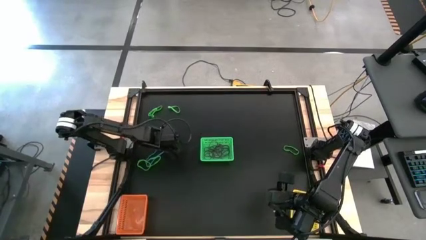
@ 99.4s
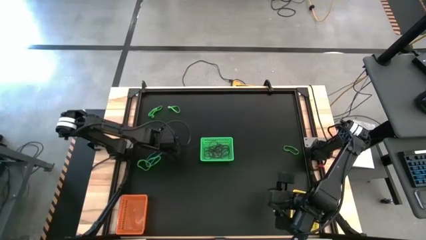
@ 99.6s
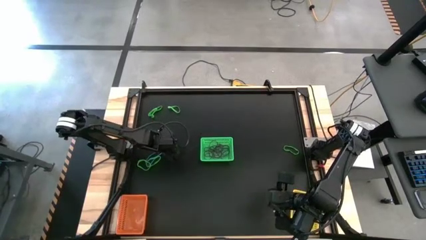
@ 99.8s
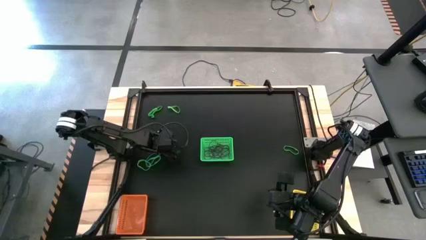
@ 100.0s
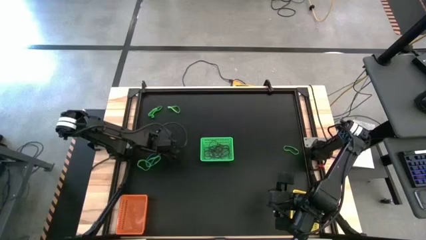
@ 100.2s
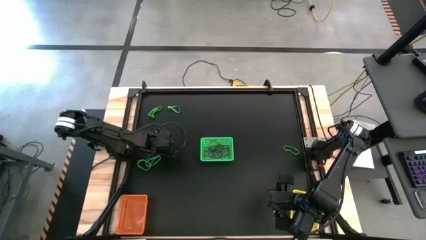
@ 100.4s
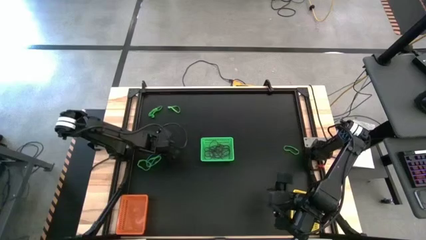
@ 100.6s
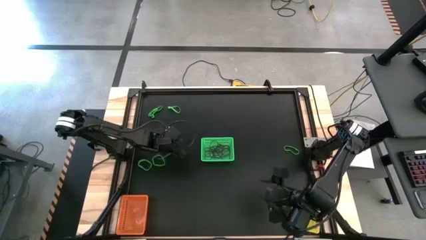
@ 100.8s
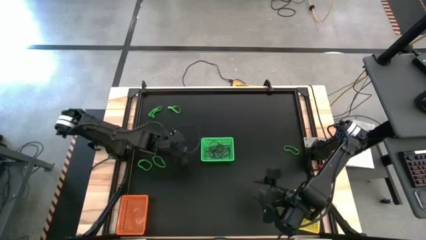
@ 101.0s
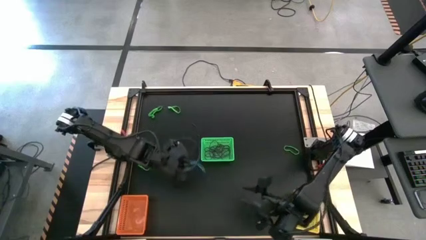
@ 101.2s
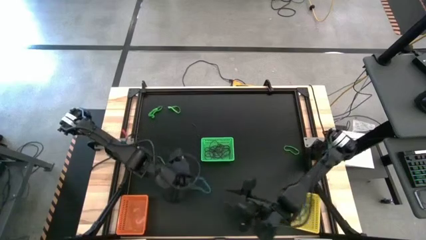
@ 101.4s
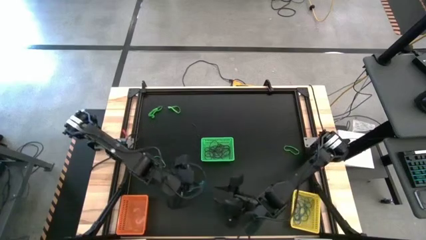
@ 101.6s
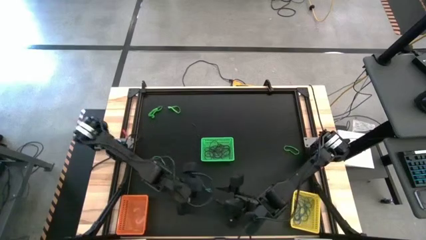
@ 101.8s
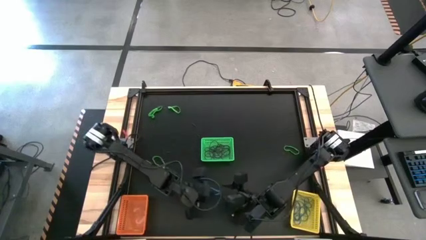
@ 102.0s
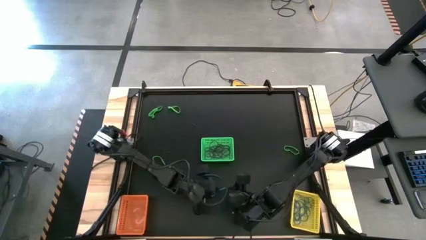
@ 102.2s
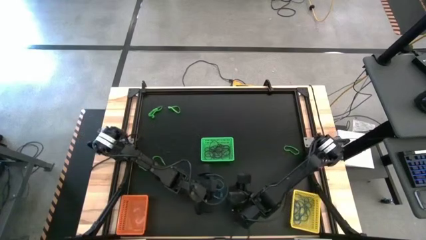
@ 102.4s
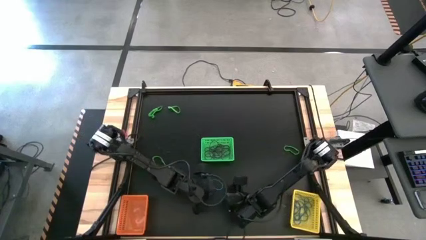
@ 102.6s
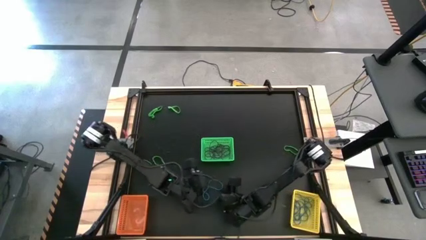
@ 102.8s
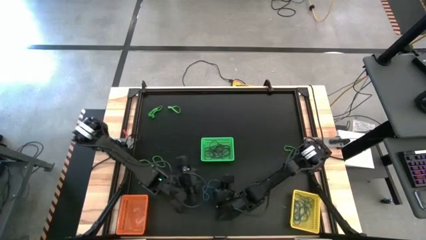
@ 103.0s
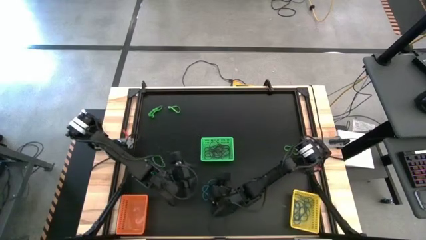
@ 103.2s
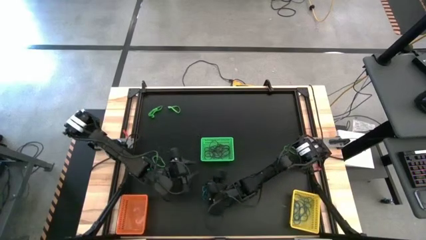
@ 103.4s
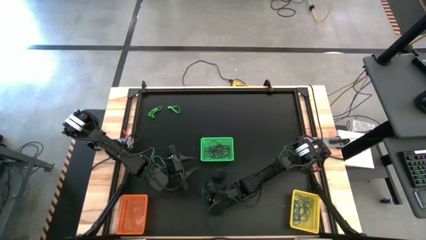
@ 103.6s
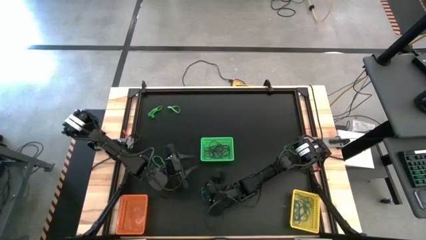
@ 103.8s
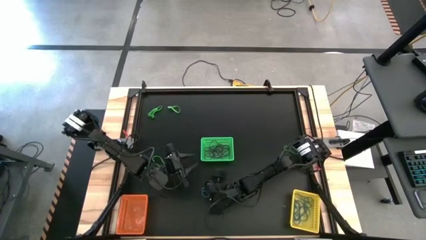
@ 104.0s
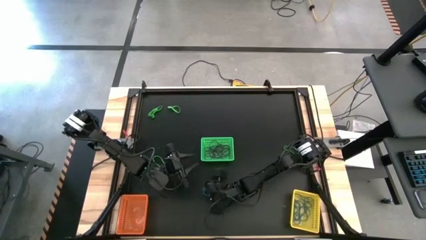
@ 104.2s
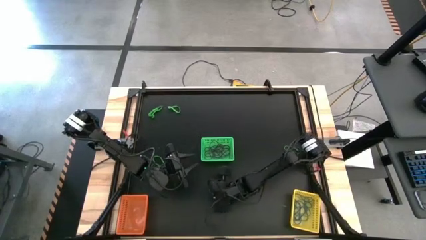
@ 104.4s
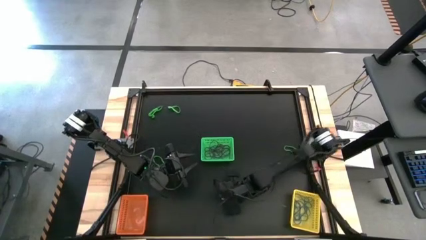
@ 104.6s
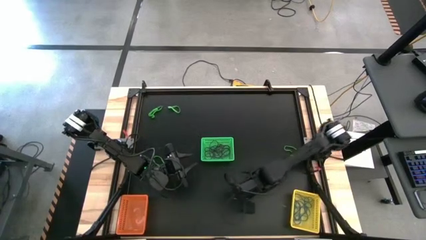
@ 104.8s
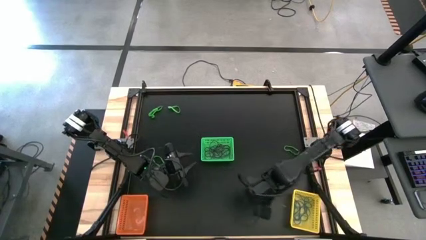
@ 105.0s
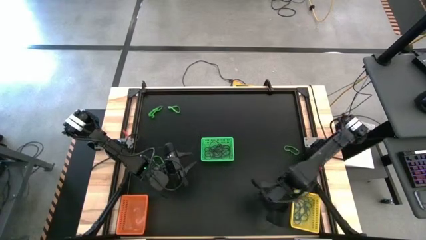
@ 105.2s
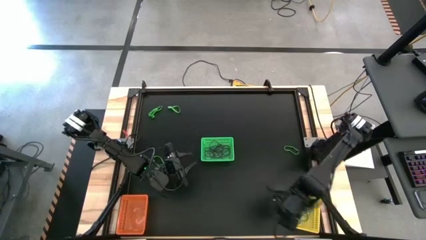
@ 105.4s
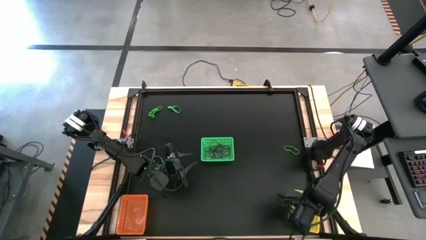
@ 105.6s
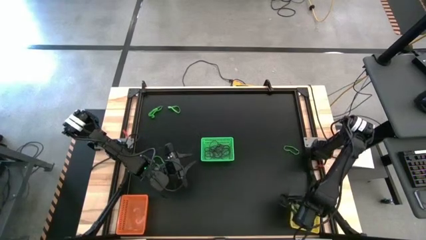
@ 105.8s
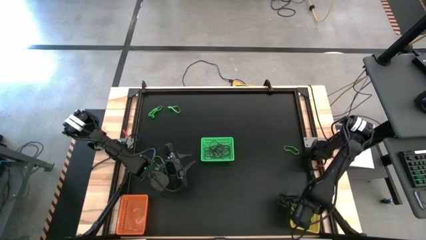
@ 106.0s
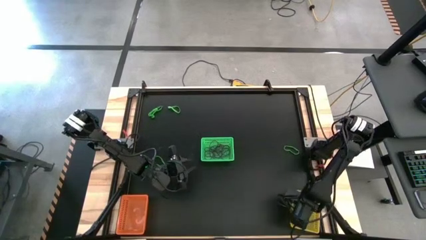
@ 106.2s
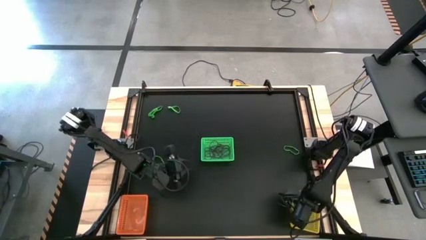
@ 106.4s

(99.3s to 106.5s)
Task: Sort rubber bands into baskets
Put the blue rubber band into the yellow basket

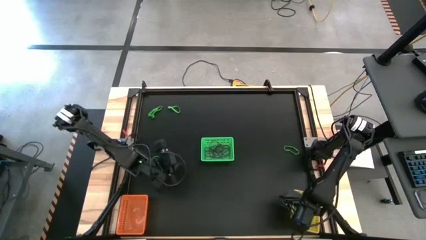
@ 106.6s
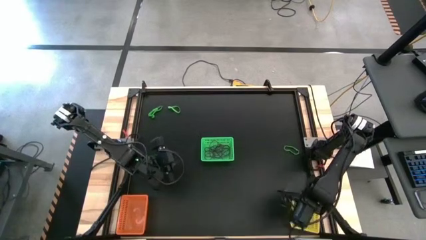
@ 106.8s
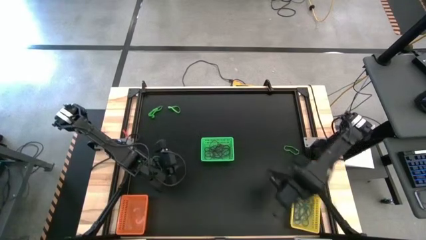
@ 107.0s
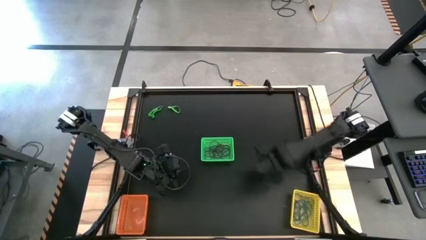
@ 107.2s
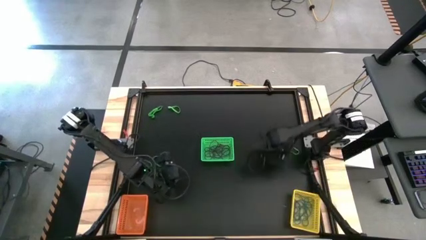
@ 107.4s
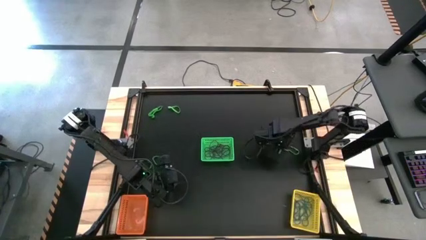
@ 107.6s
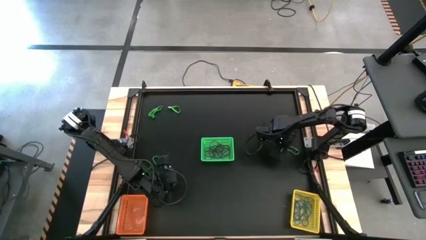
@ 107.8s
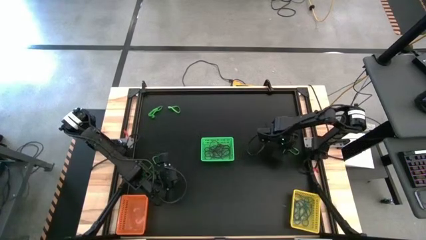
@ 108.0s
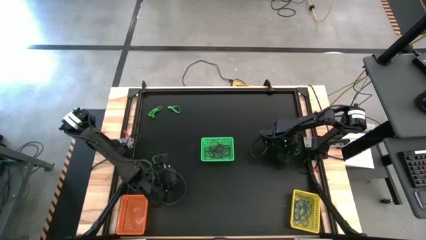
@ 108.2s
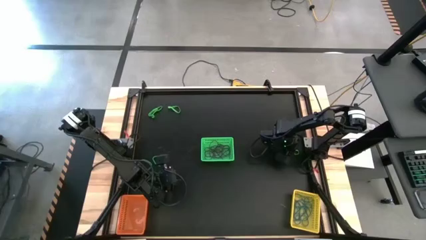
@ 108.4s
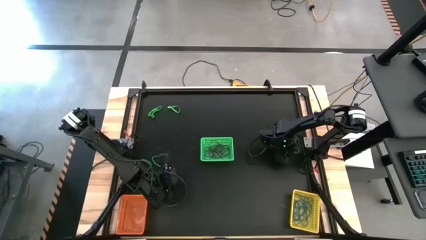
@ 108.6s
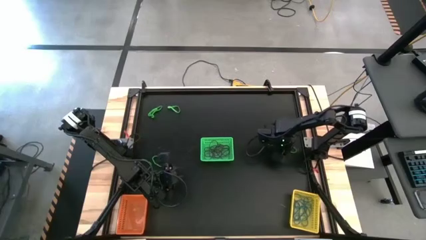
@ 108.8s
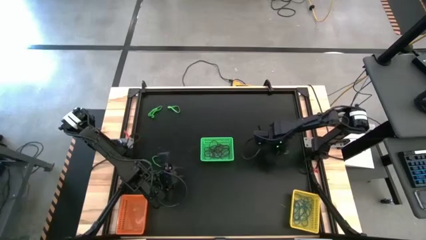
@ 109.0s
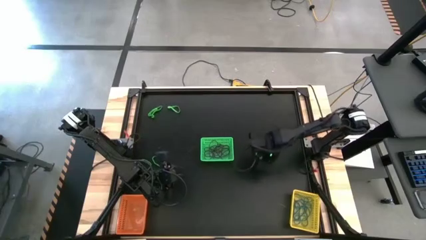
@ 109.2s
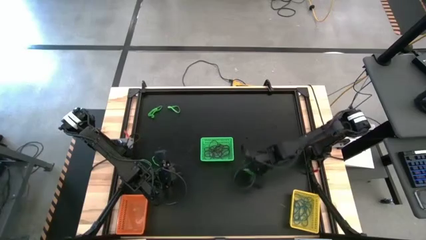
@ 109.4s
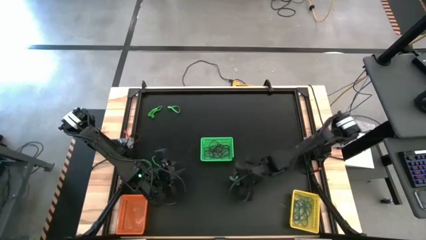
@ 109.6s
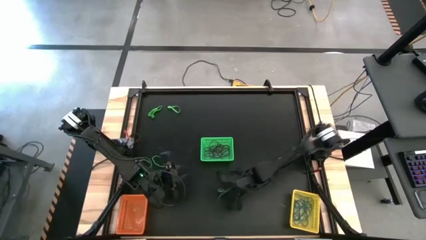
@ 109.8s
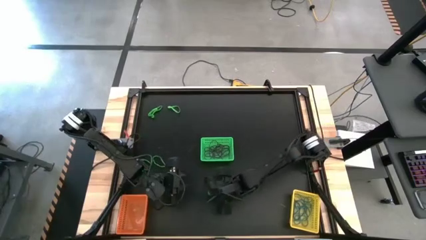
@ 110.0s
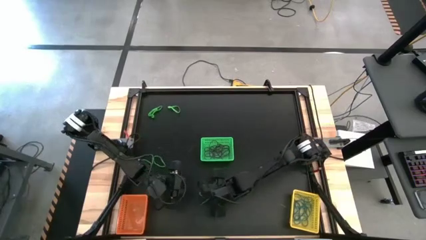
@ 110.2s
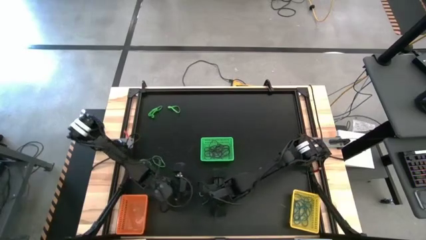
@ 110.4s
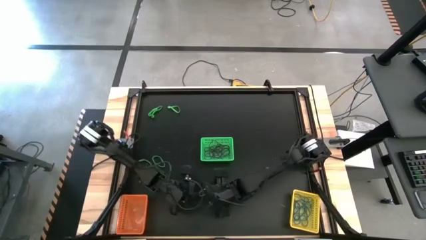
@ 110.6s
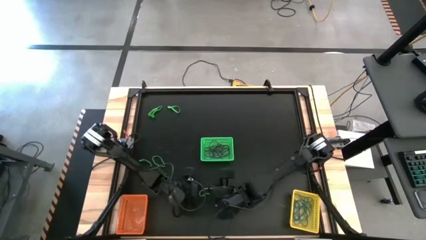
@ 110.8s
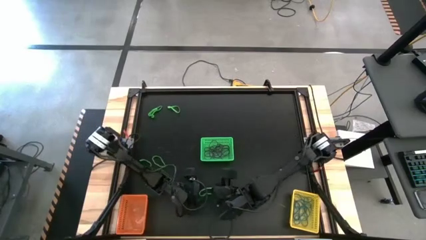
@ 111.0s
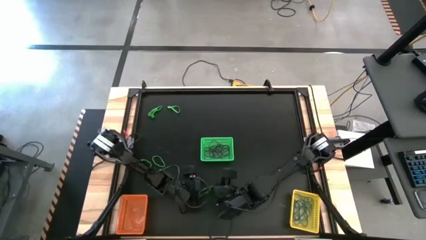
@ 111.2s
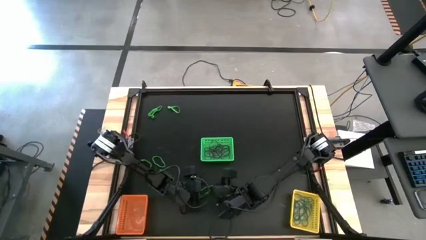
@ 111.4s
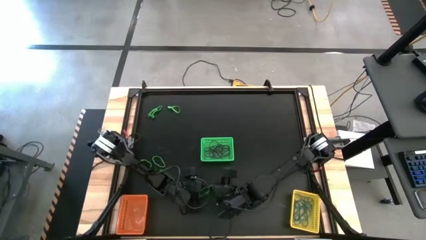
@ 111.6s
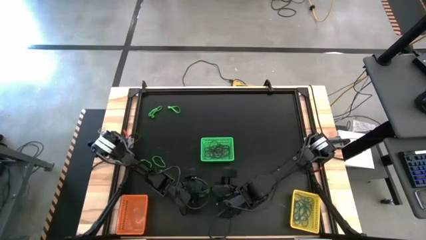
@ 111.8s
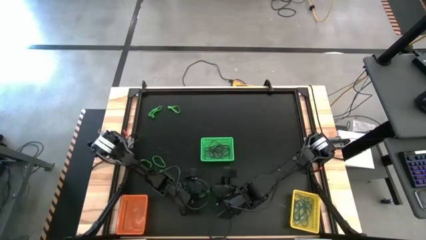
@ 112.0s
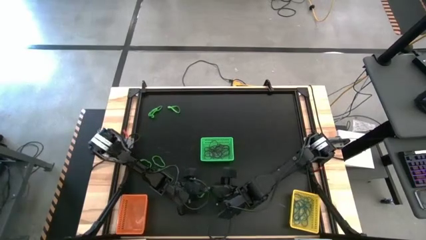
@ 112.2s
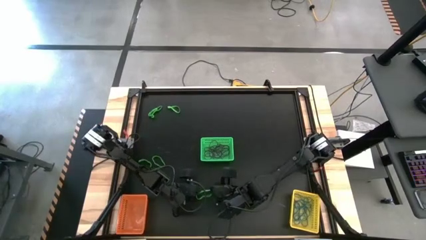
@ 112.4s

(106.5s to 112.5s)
Put the green rubber band into the orange basket

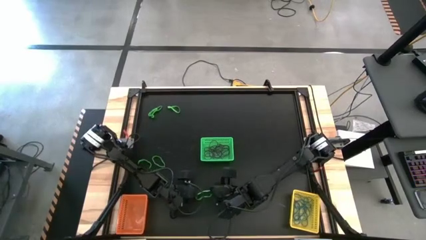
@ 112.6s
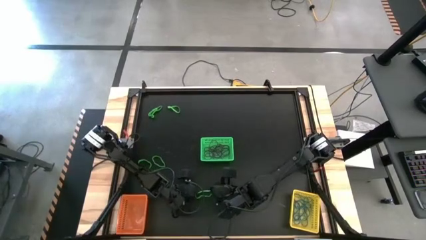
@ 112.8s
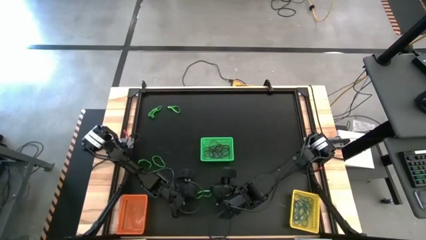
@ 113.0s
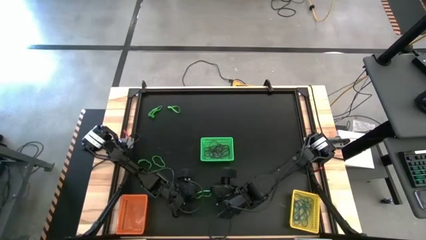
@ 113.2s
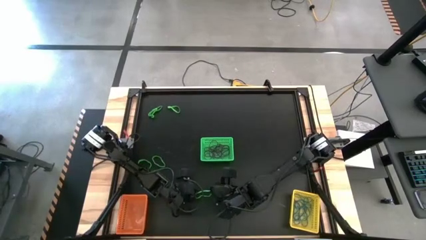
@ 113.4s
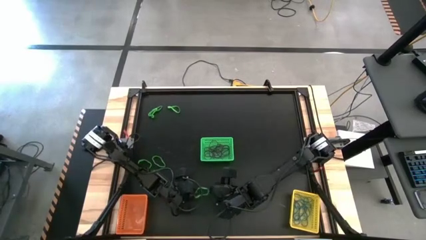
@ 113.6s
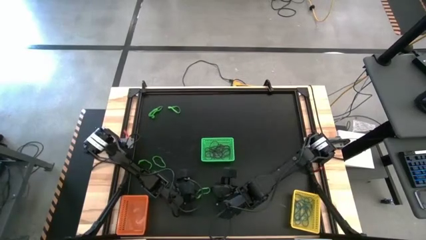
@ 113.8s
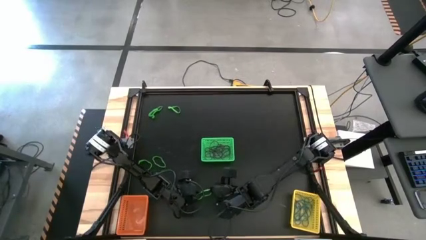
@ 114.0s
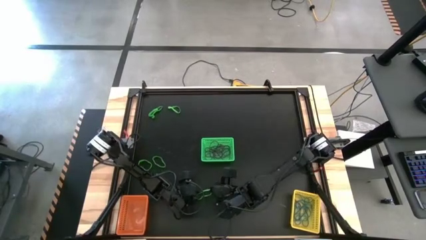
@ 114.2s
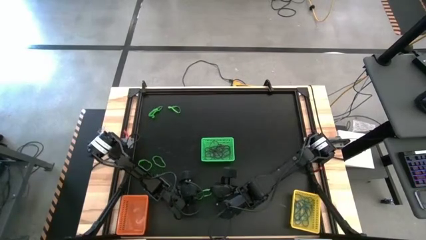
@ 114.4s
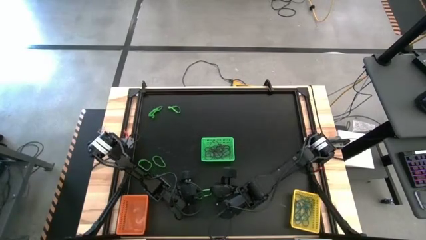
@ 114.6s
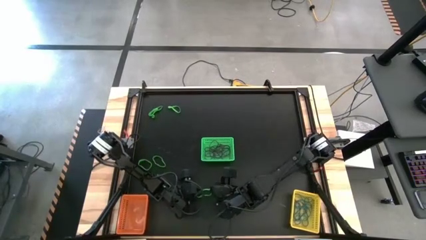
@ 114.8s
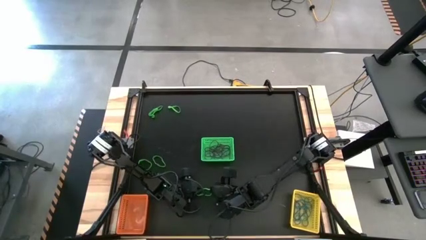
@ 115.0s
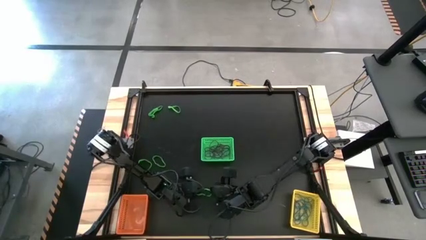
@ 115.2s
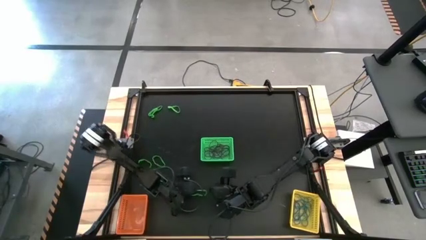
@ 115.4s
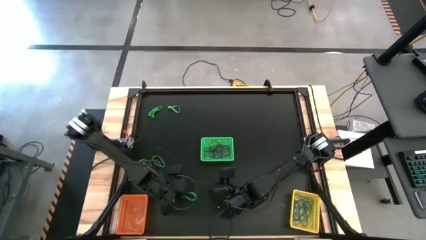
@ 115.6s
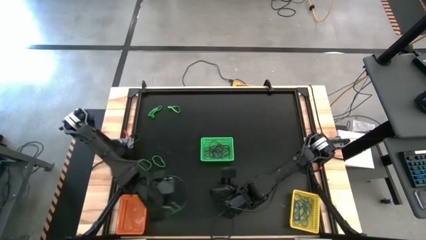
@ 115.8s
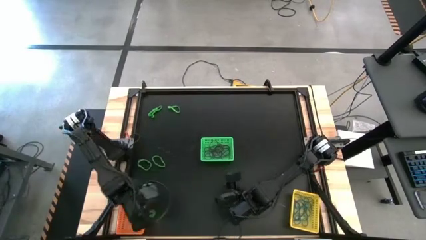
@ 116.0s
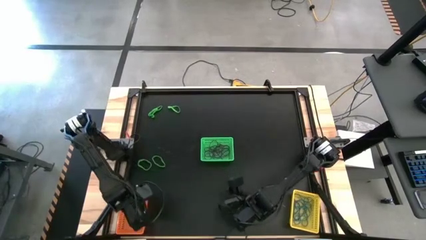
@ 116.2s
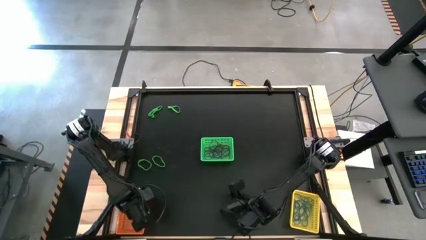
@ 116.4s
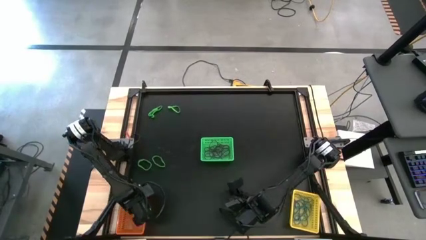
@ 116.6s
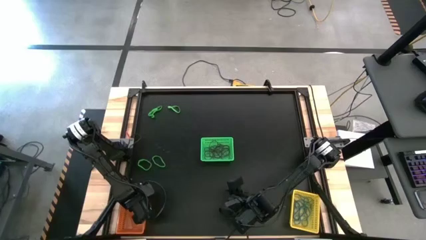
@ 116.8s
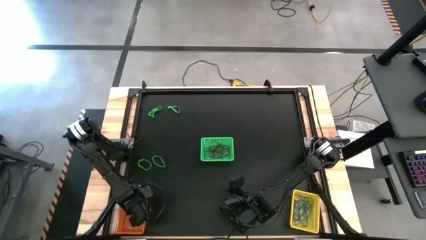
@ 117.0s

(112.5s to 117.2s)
Put the green rubber band into the orange basket

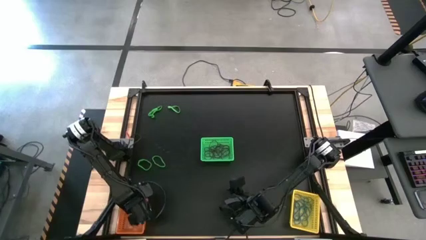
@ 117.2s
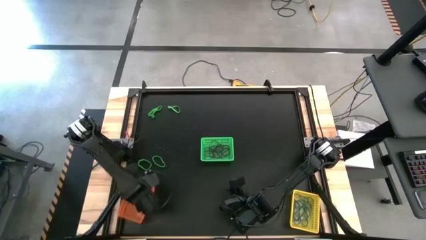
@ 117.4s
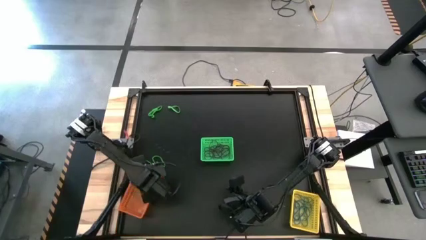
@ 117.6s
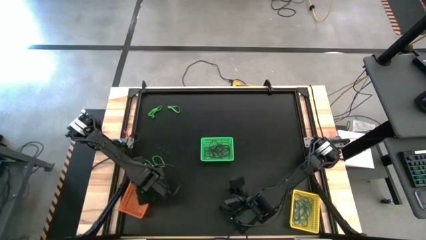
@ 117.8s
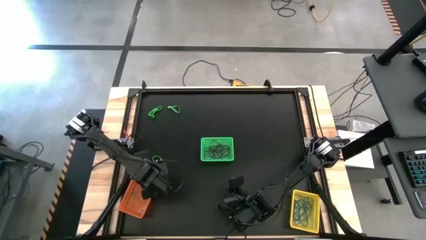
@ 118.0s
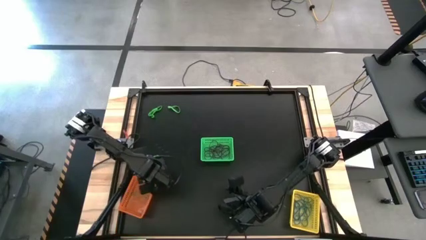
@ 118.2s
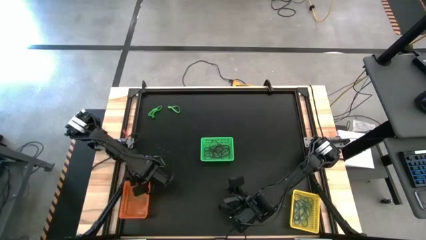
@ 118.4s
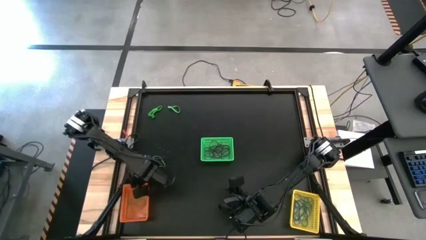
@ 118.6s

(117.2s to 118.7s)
Adjust the orange basket
